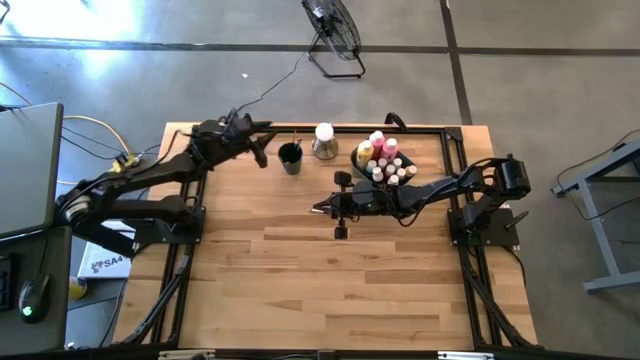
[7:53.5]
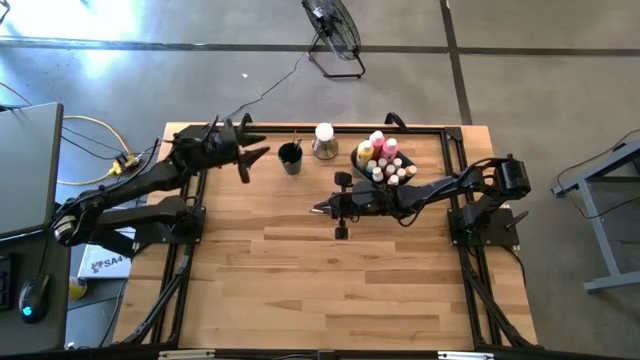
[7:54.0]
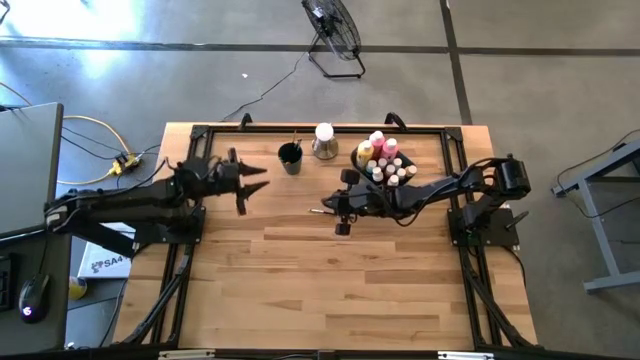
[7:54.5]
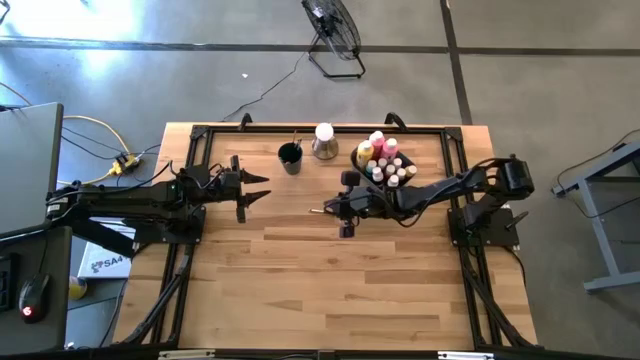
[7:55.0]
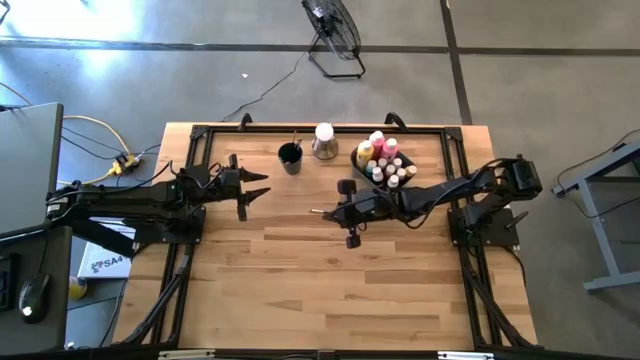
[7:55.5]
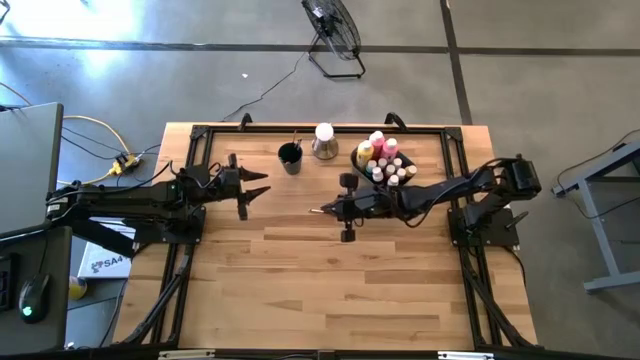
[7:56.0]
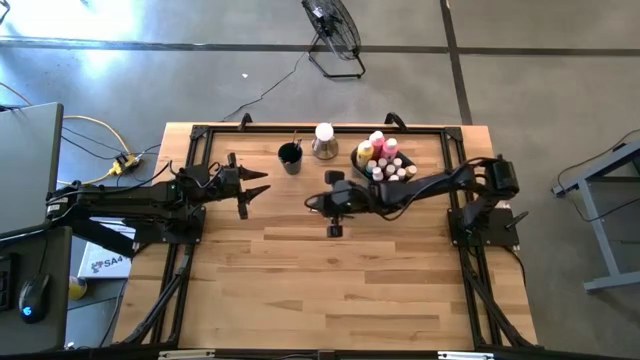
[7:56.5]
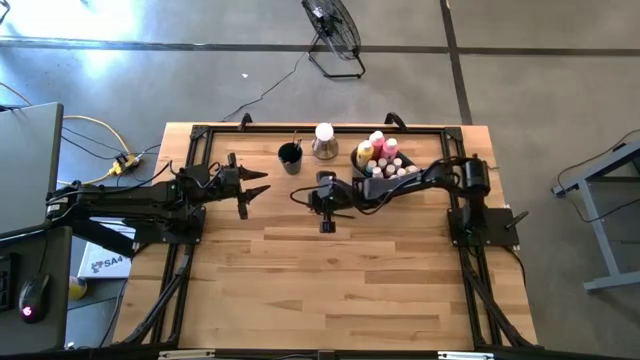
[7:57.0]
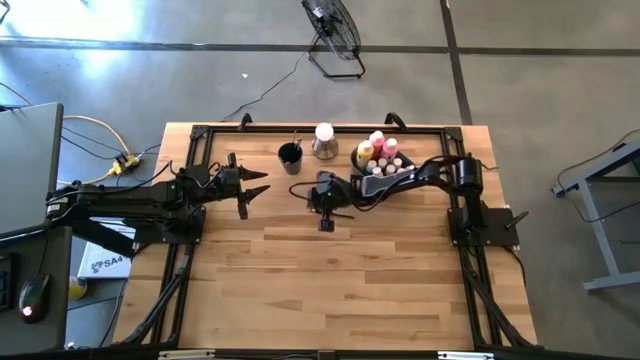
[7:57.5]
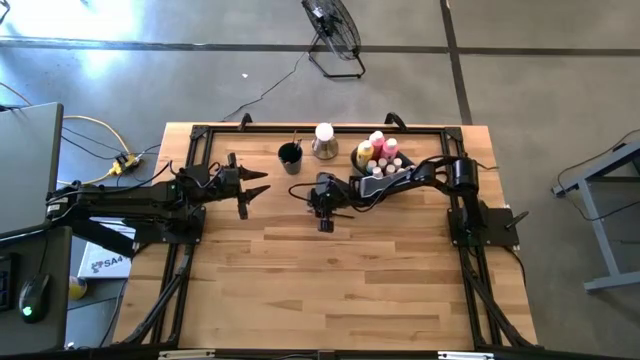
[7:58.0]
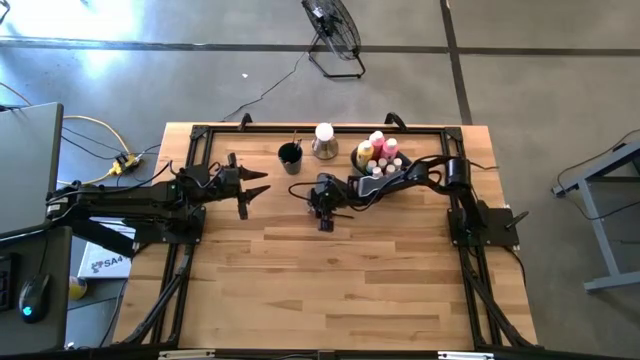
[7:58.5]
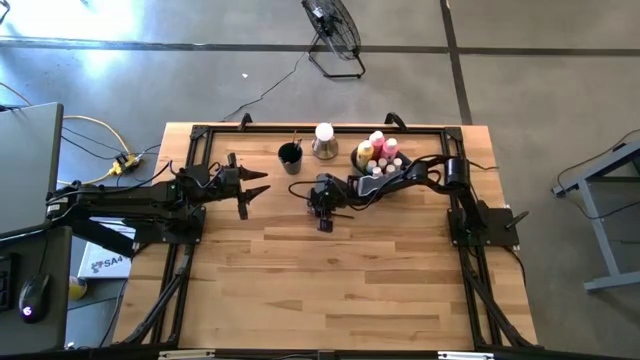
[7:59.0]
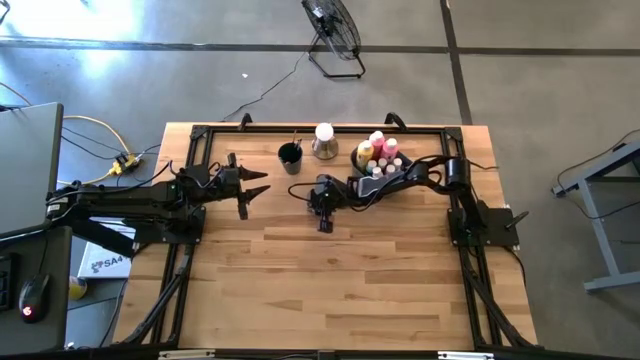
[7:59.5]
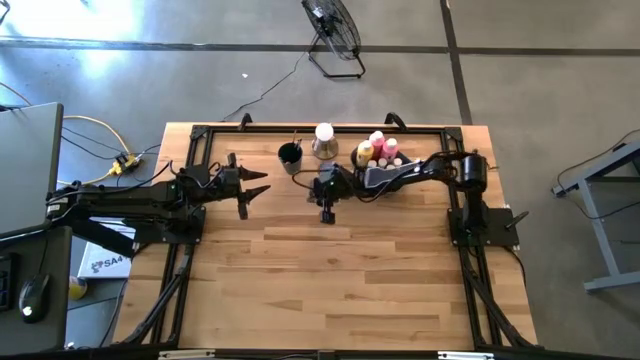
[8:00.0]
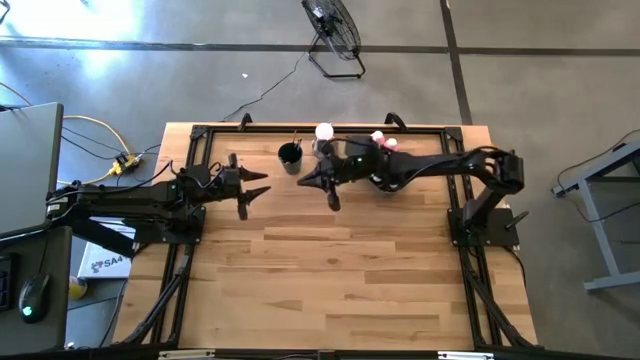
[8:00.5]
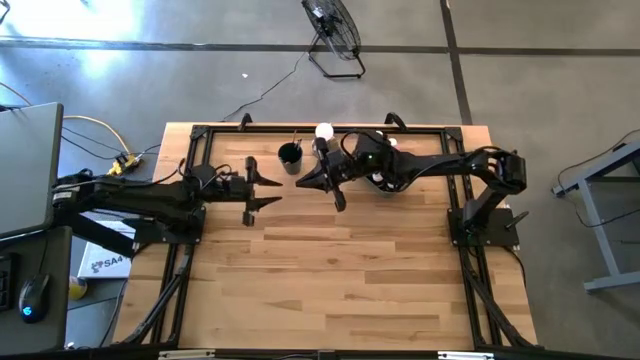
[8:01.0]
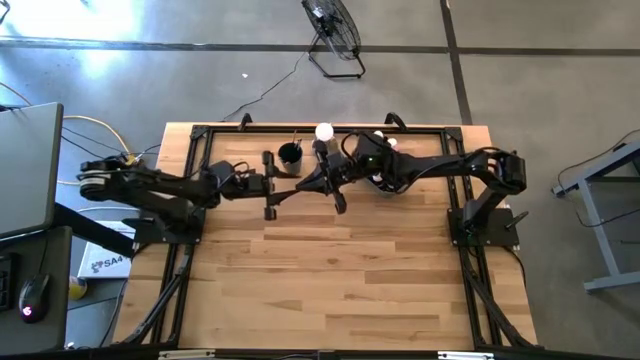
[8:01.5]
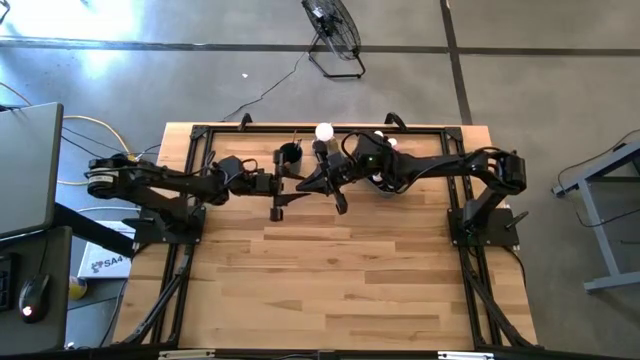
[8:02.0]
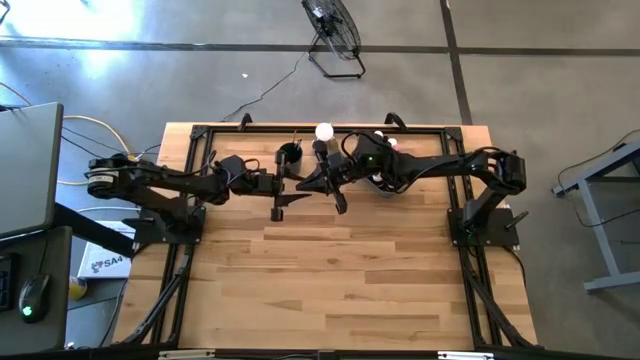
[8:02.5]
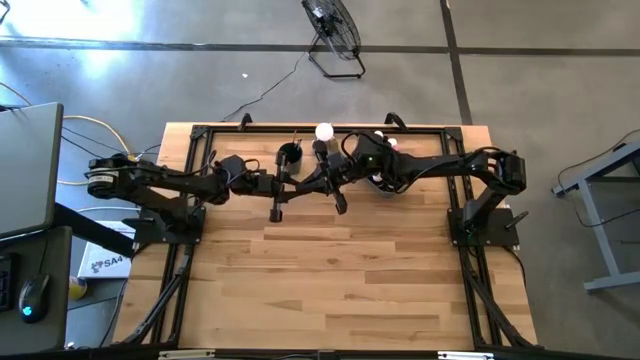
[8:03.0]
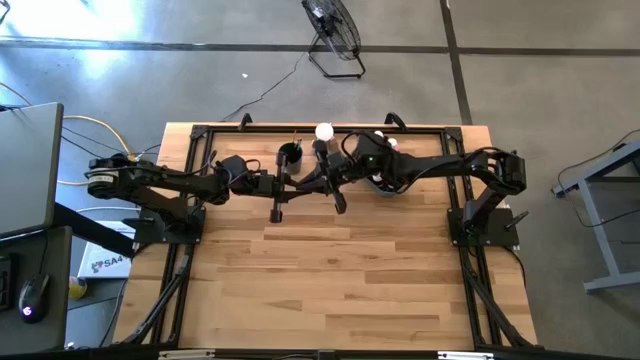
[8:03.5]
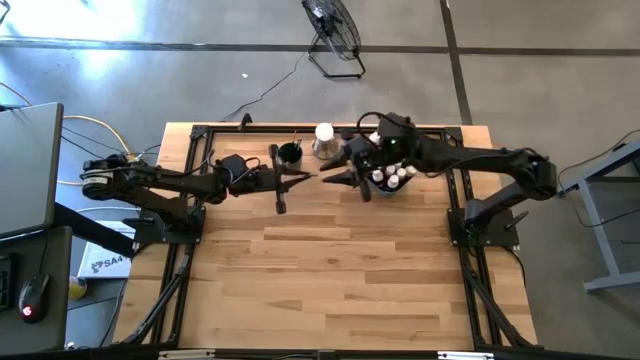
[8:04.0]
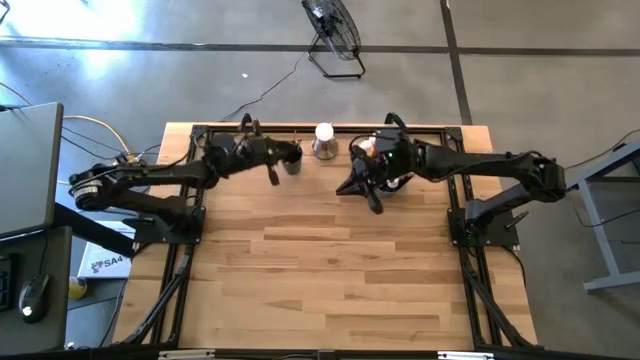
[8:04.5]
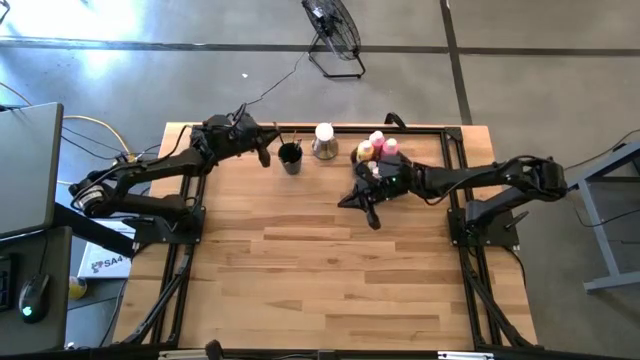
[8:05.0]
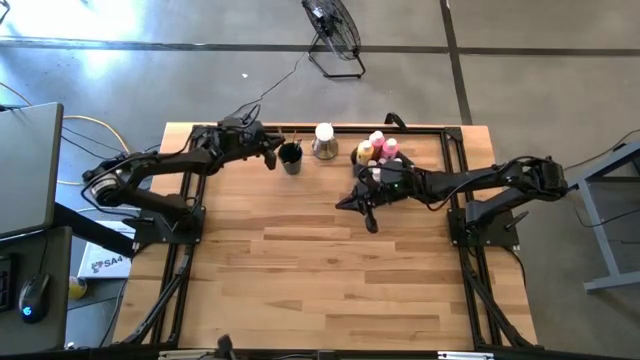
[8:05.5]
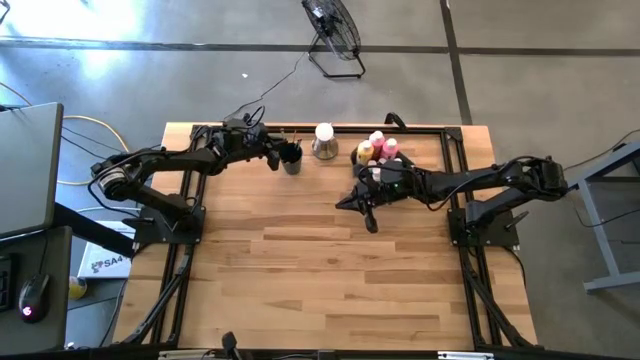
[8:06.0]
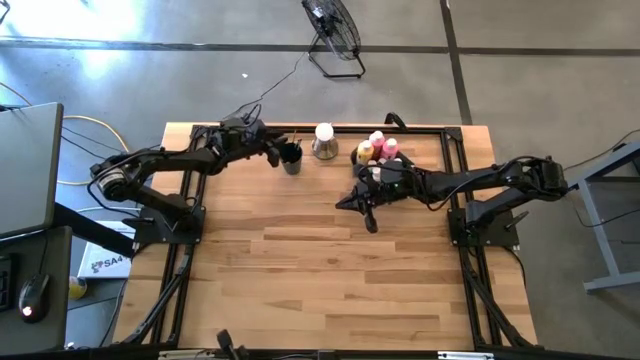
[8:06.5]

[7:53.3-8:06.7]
Task: Pick & Place Paint Supplies
Put the silver paintbrush into the blue cup
